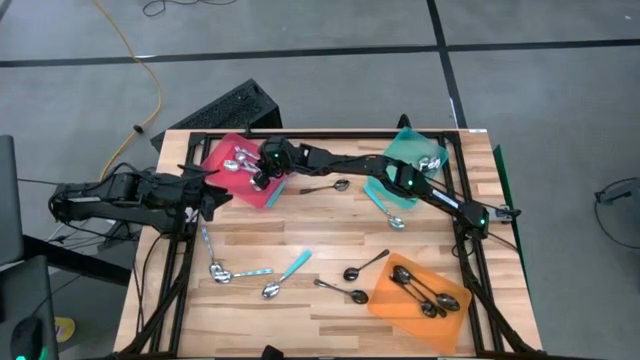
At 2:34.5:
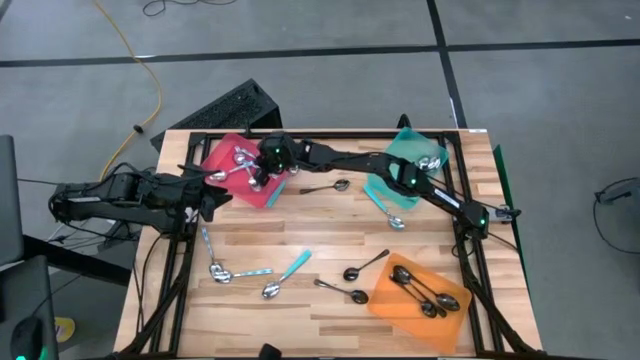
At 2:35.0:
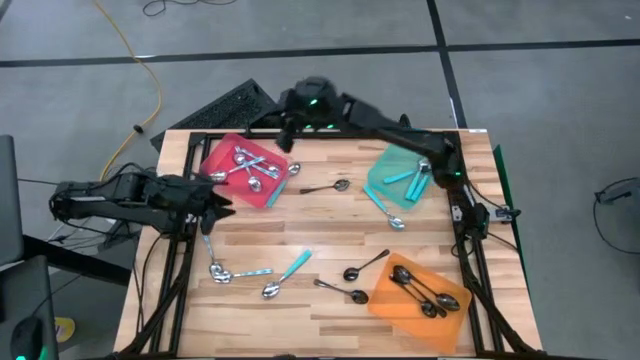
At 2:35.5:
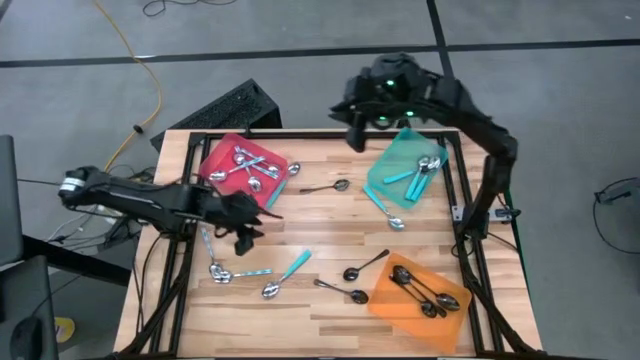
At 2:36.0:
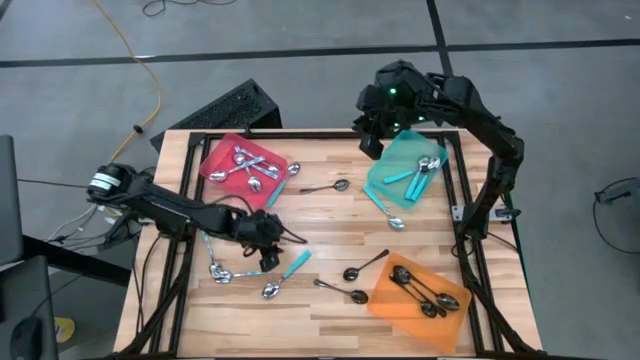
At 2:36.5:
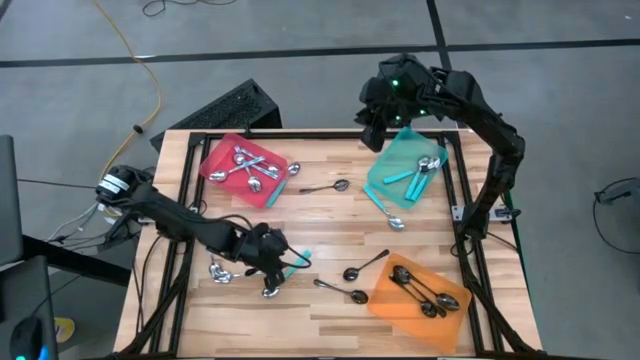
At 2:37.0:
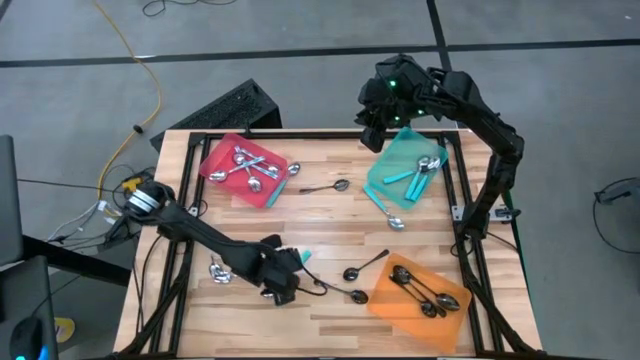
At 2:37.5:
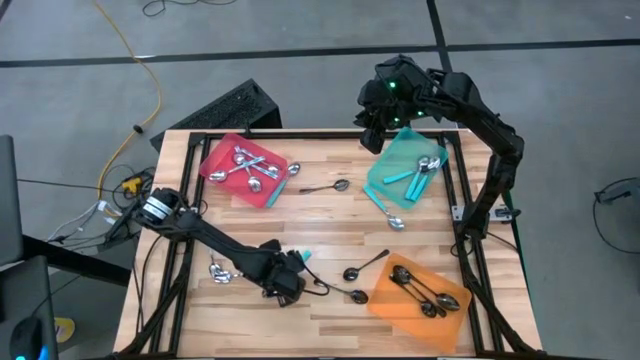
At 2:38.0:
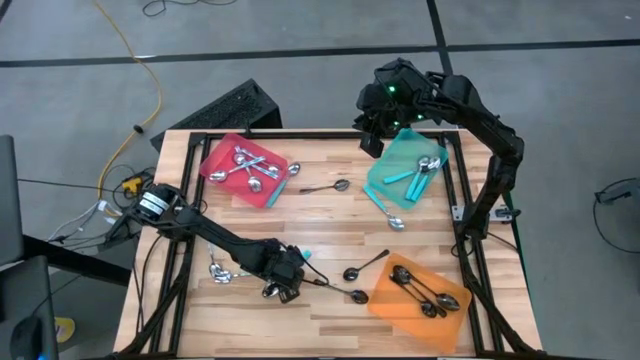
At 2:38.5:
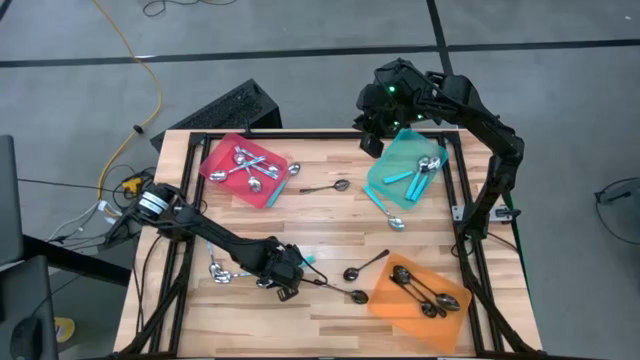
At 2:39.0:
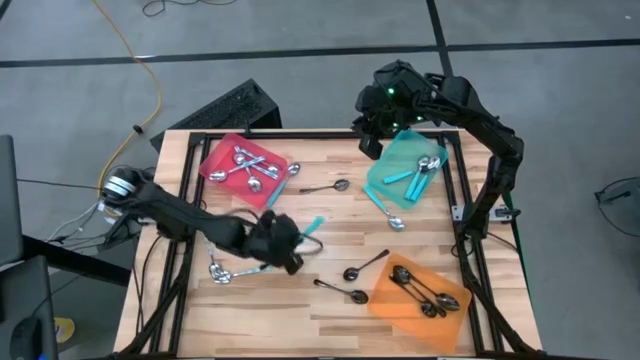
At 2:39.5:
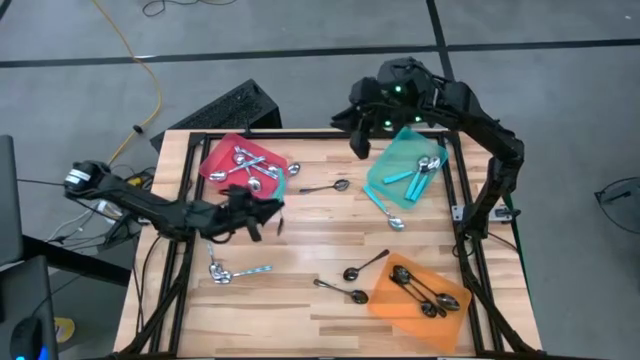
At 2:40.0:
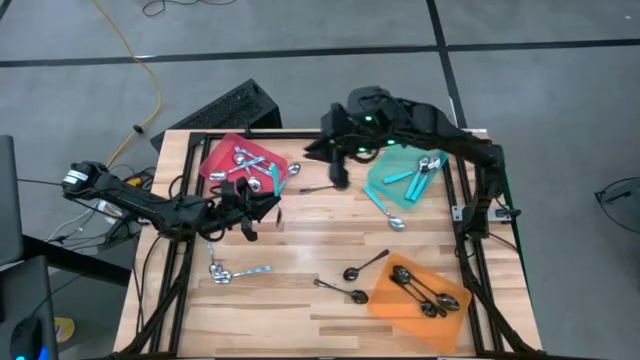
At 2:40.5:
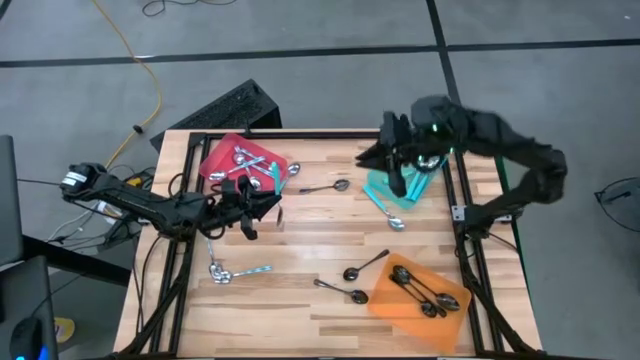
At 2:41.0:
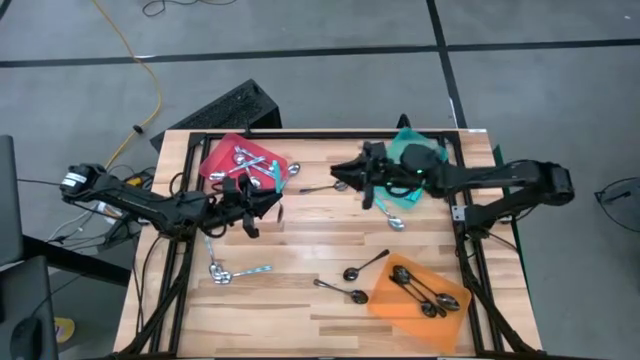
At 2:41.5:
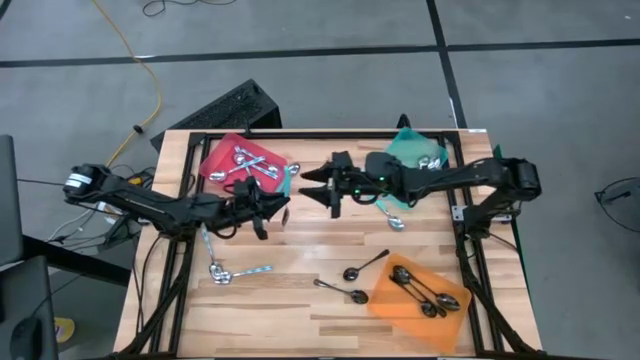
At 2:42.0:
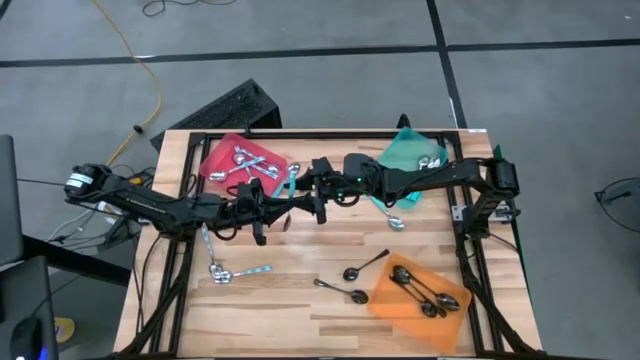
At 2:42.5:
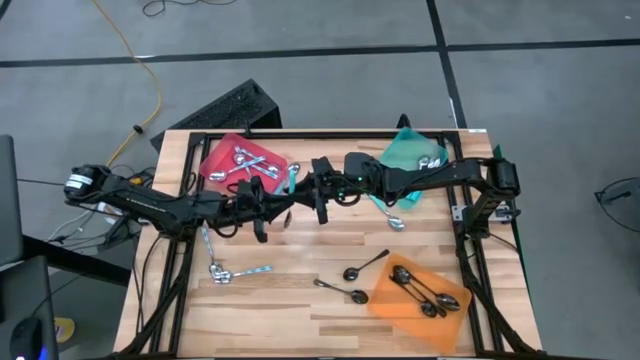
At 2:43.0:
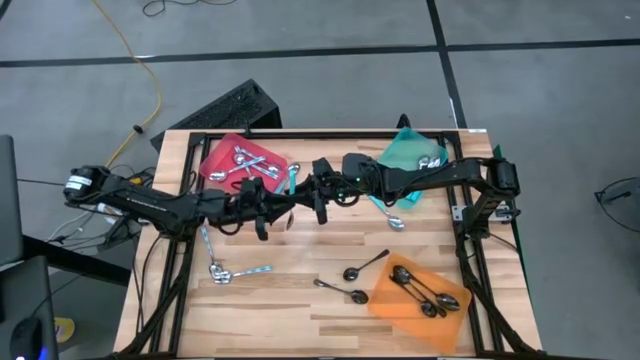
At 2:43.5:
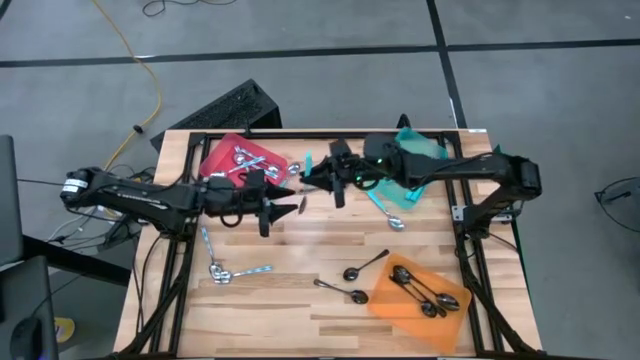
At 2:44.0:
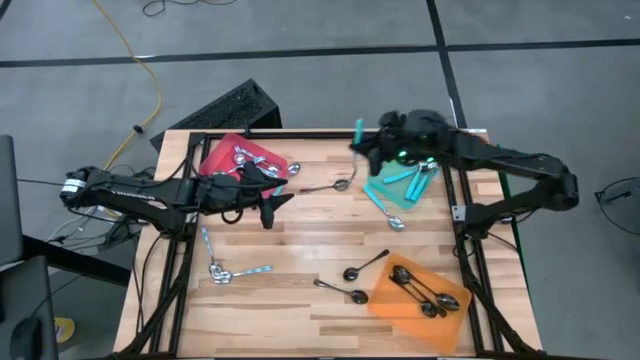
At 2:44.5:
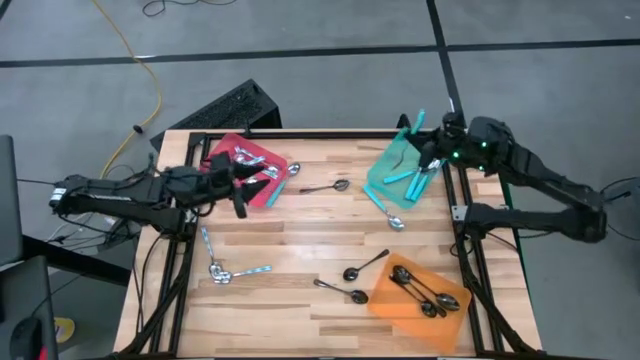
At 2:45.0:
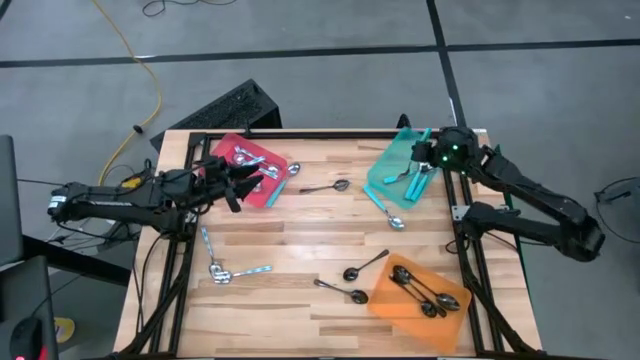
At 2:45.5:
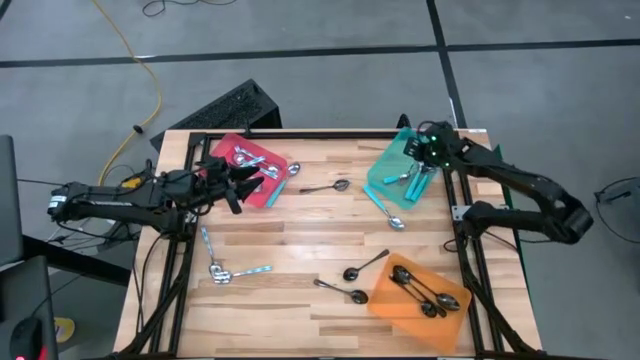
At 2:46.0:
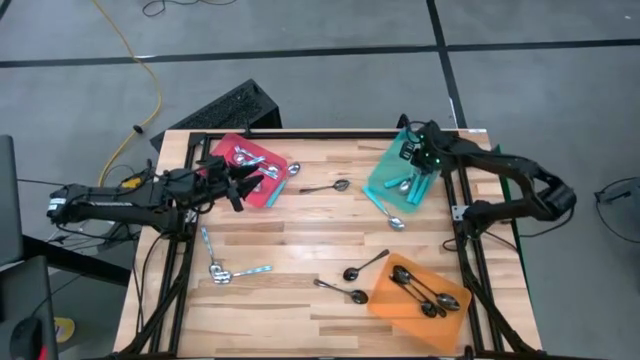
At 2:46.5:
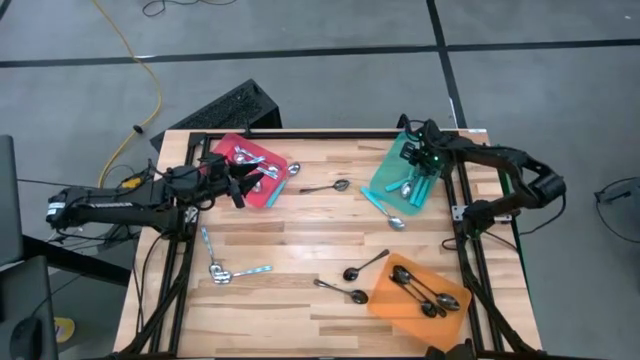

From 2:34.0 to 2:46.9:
Task: Sort silverware by color (type)
Put the blue spoon into the blue bin

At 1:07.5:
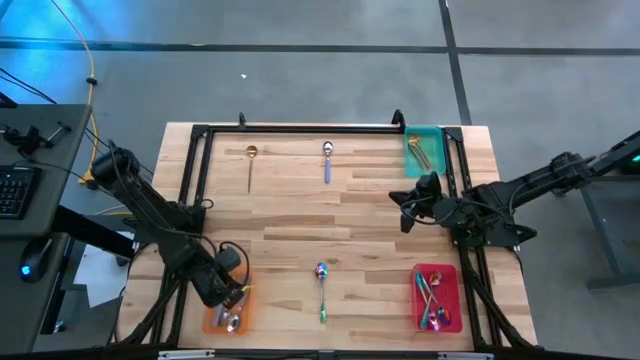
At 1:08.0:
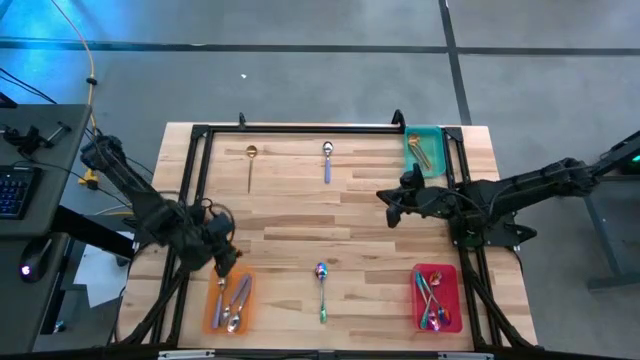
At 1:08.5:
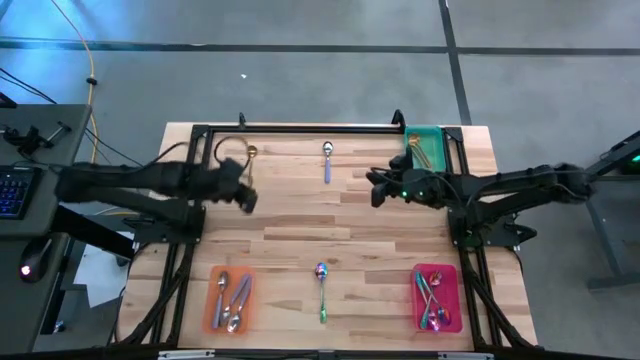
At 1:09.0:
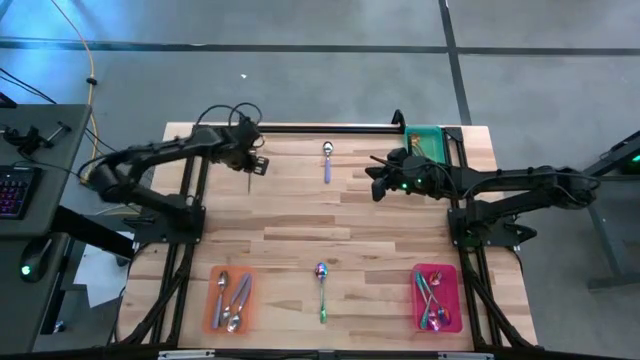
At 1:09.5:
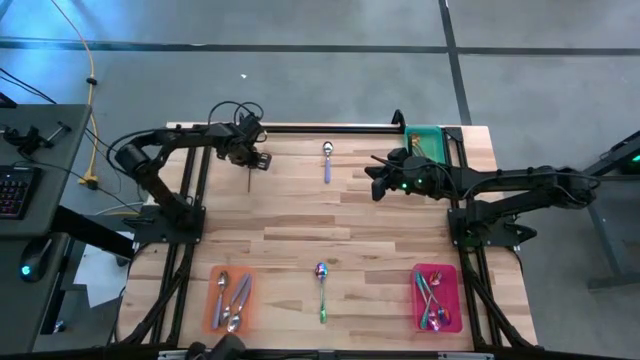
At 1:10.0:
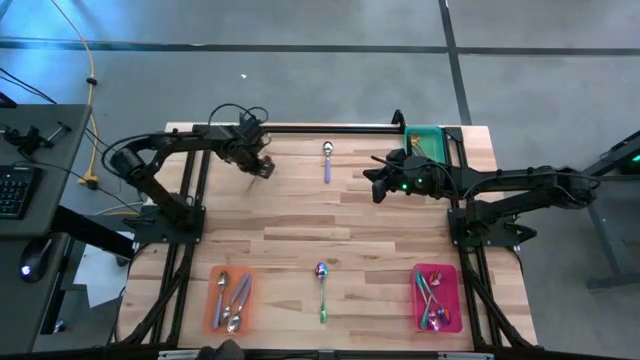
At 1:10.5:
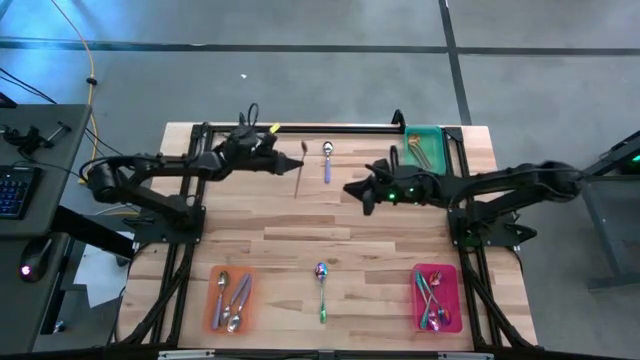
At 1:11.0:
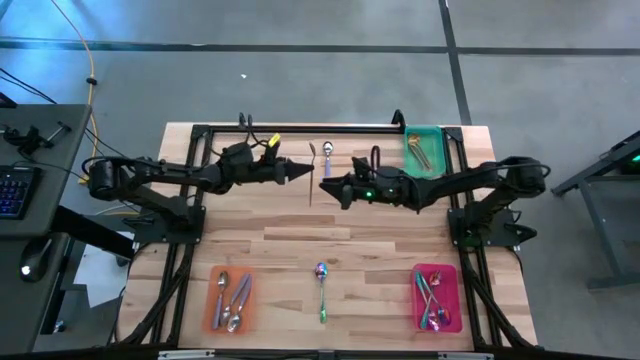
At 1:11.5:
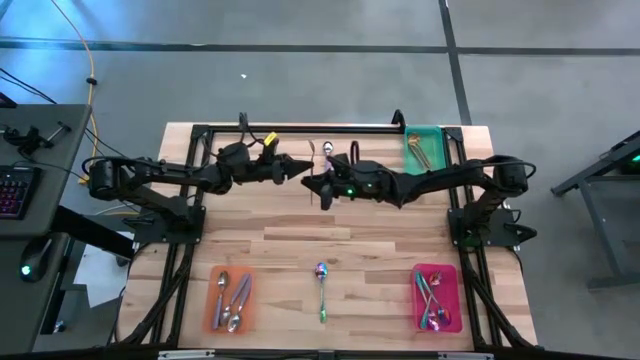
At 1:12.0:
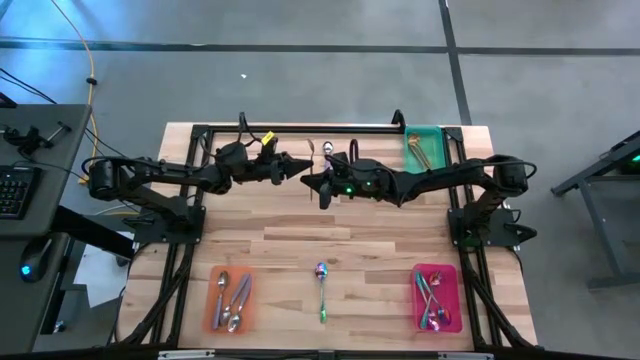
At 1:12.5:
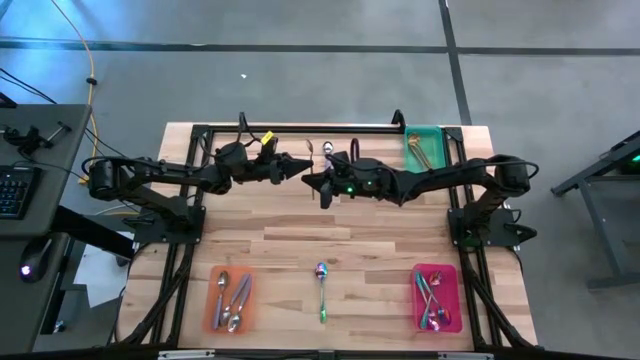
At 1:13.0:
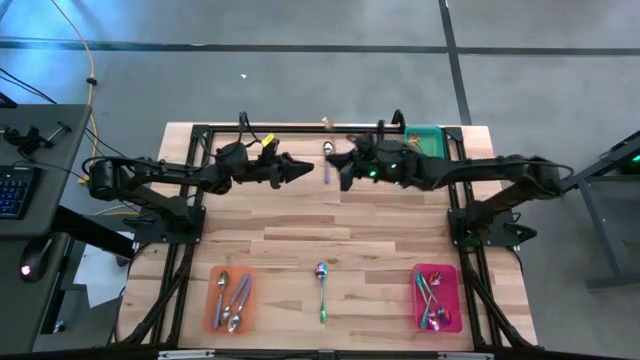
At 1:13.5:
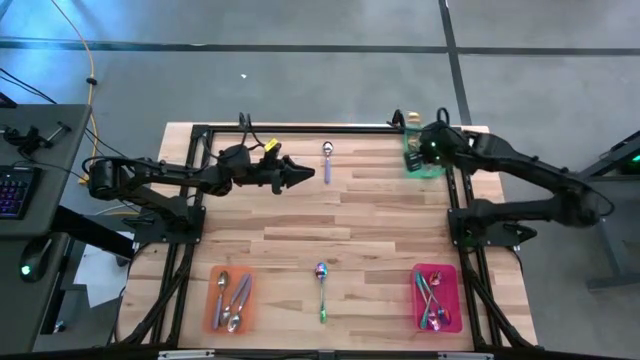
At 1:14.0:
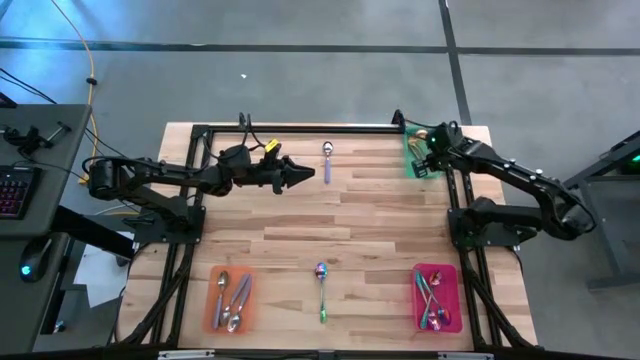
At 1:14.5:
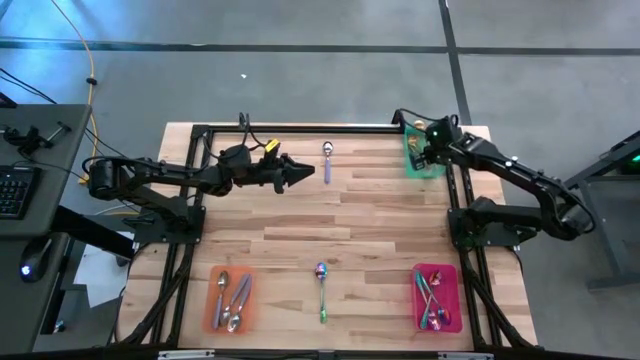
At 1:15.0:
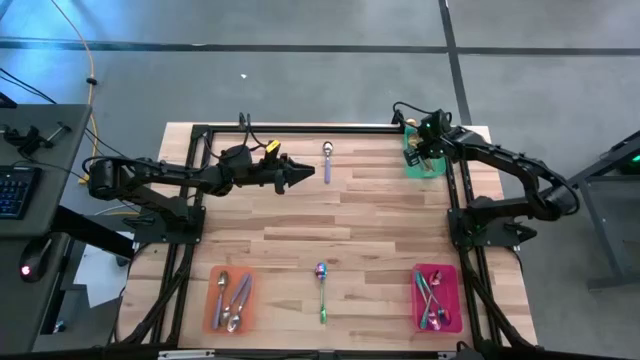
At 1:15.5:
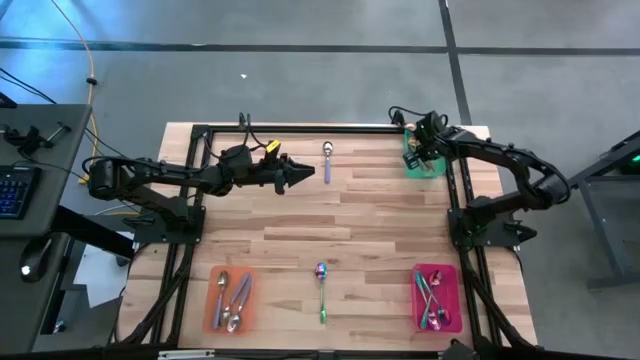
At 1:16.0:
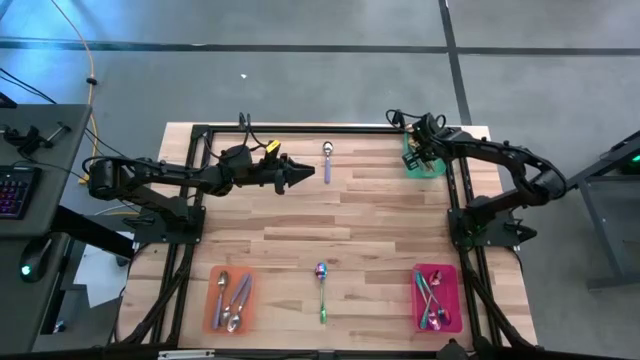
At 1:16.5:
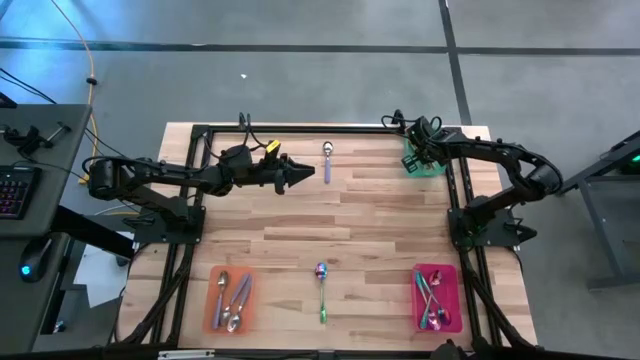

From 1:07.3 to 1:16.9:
Task: Sort silverware by color (type)
Put the golden spoon into the green bin
